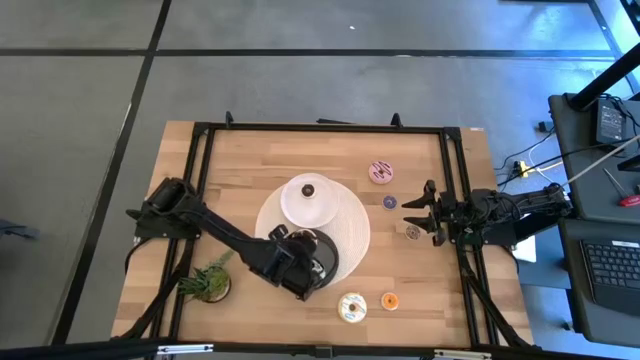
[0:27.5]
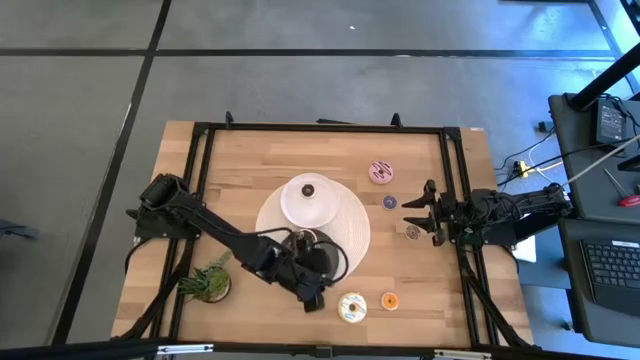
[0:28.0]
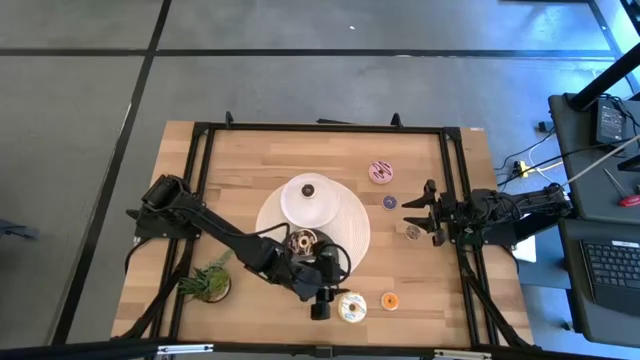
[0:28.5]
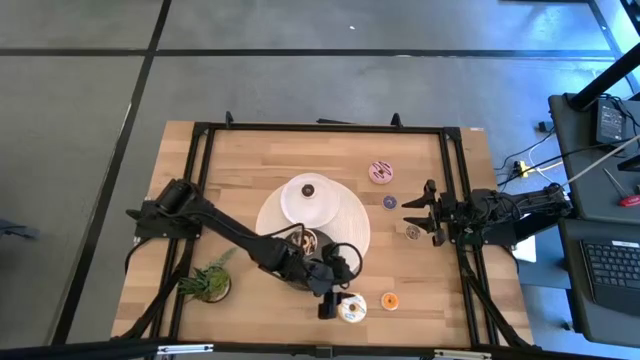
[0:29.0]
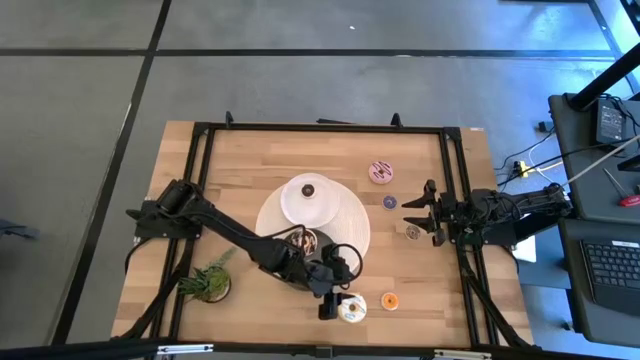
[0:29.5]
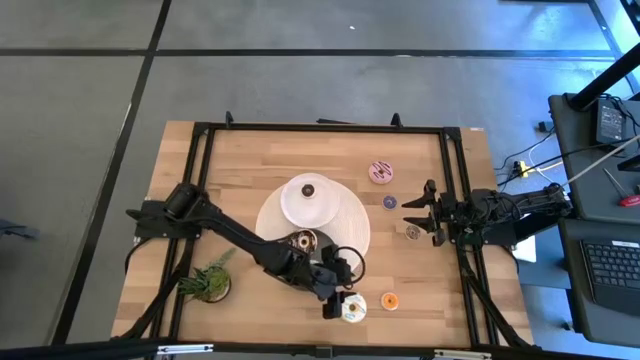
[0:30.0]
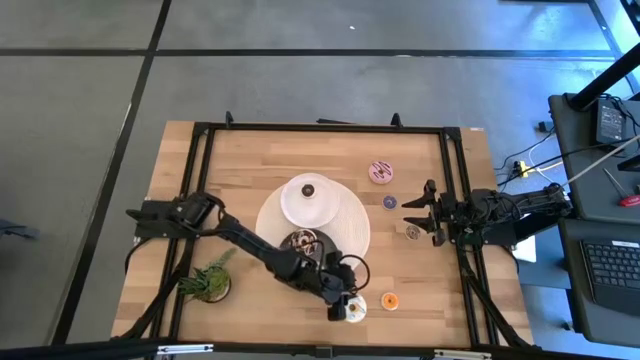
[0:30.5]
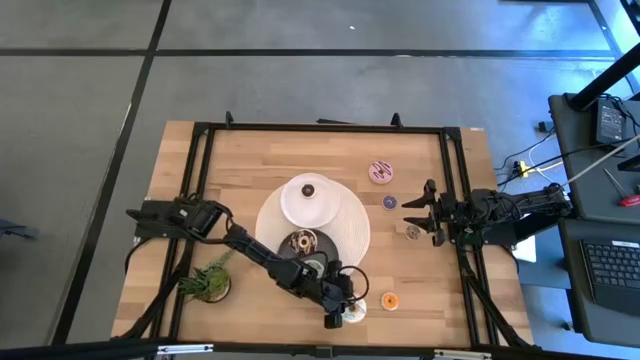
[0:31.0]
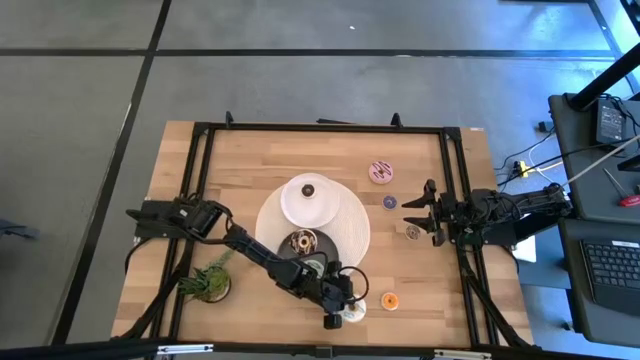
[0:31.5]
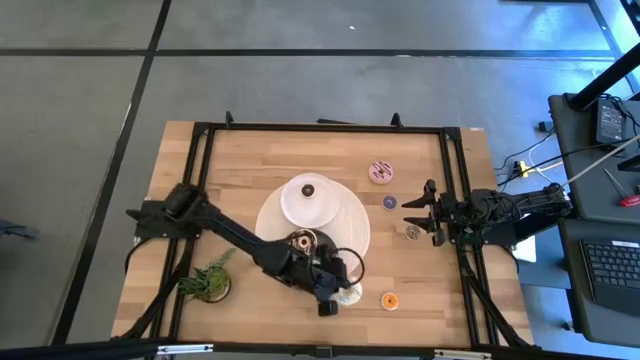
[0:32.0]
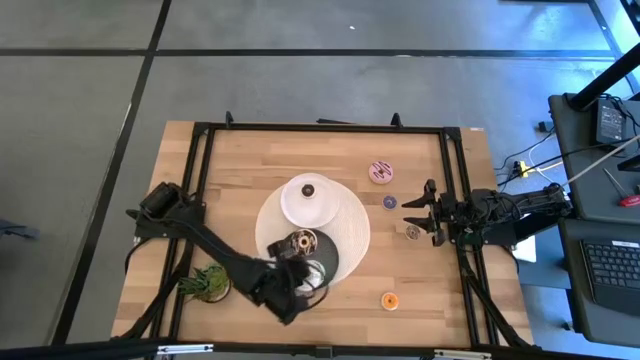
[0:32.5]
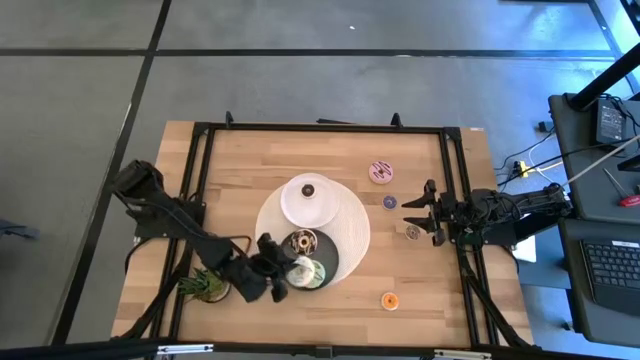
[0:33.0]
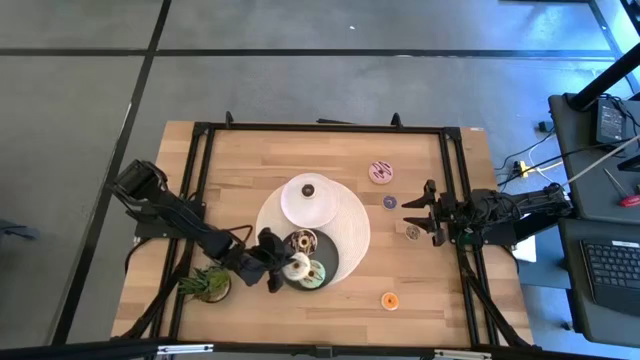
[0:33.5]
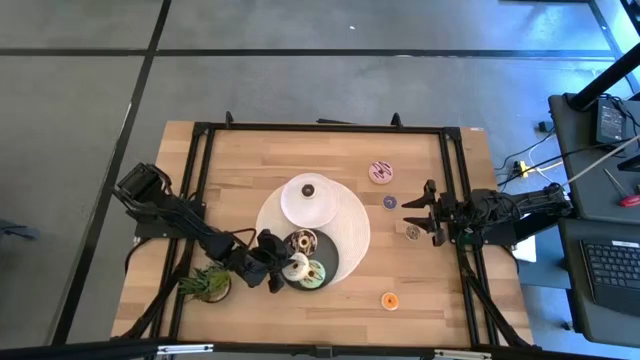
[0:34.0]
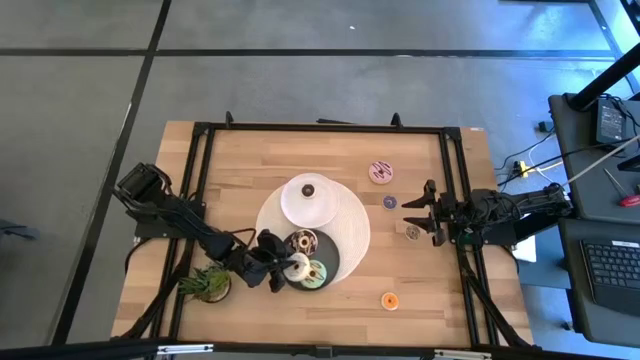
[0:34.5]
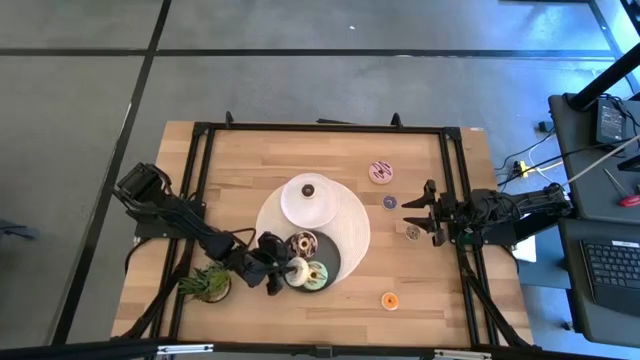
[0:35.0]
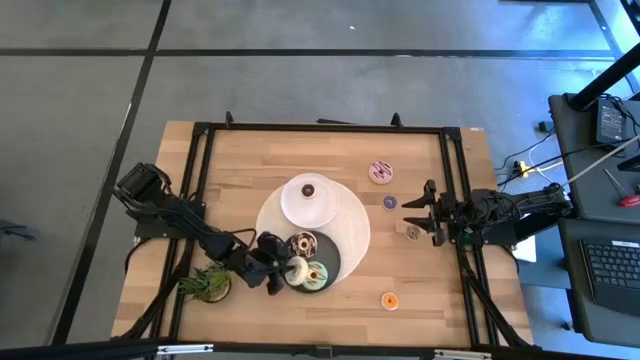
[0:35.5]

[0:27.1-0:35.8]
Task: Pick & Place donuts
Put the large white donut on the black plate

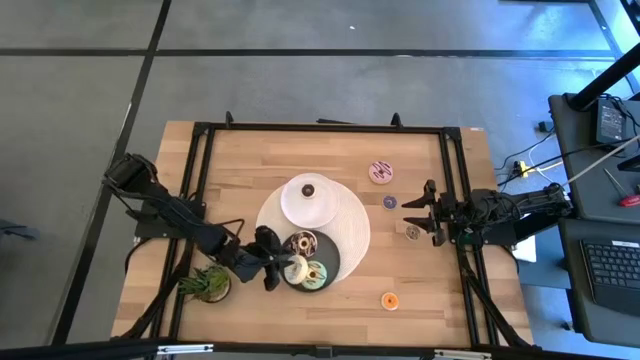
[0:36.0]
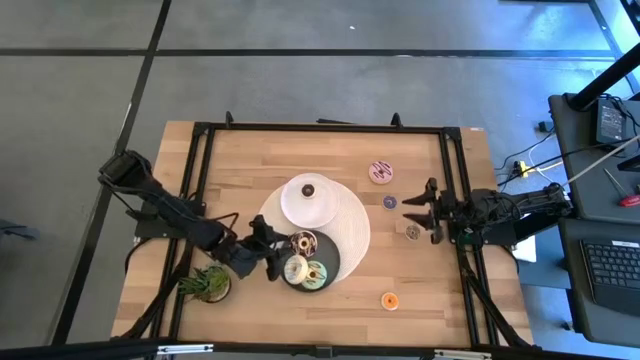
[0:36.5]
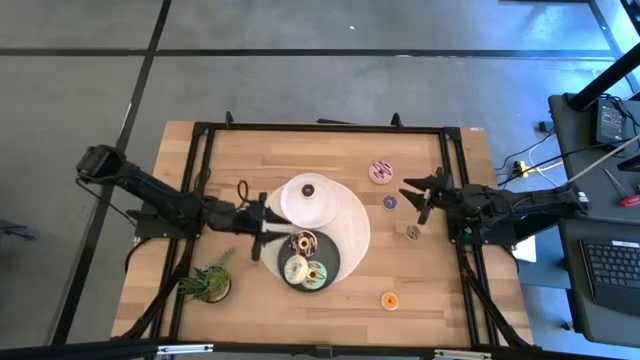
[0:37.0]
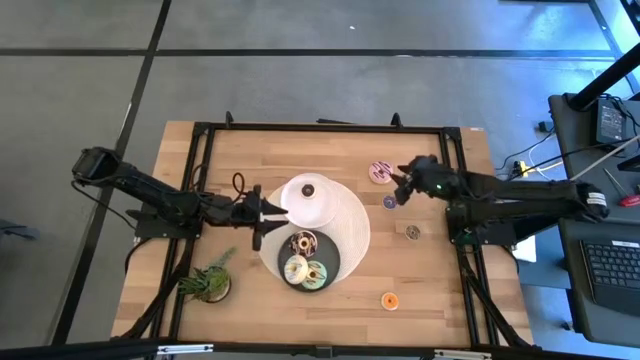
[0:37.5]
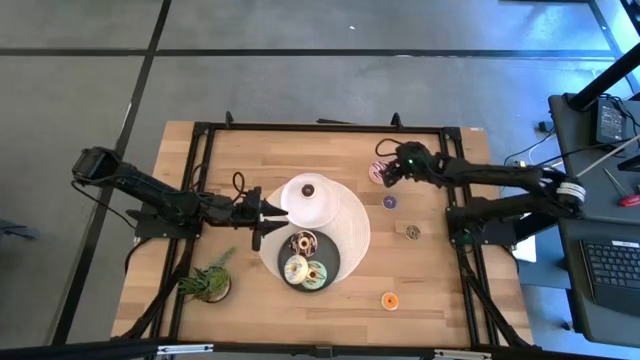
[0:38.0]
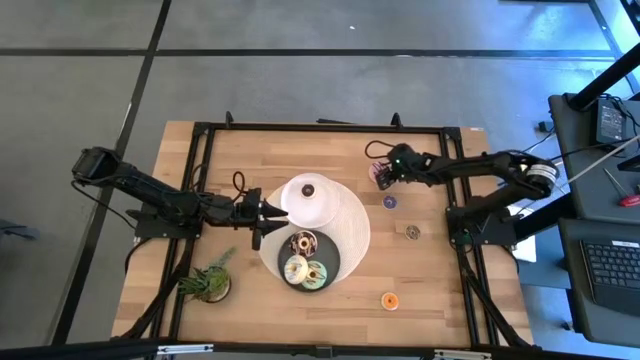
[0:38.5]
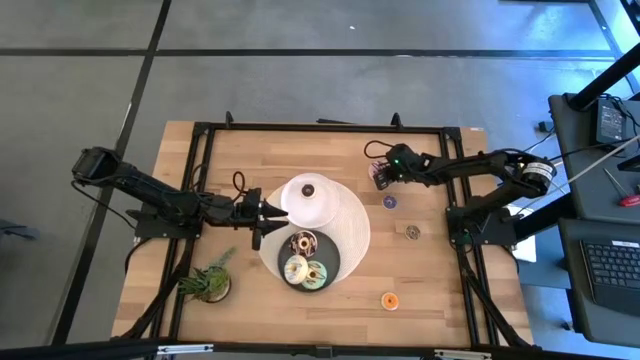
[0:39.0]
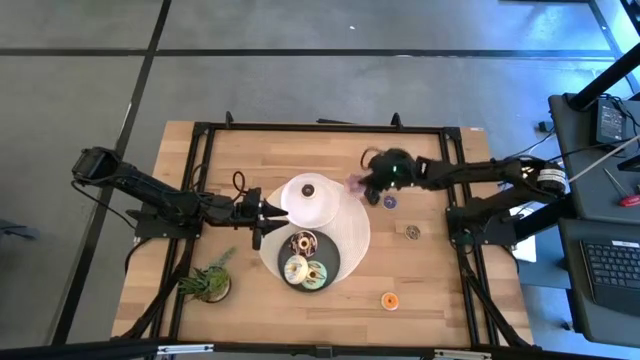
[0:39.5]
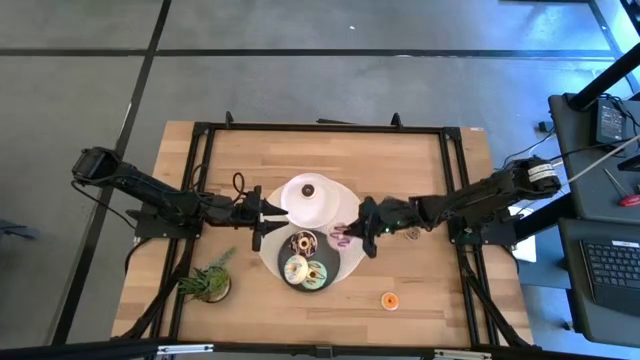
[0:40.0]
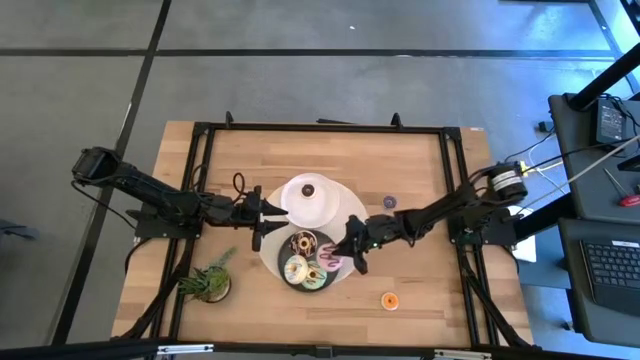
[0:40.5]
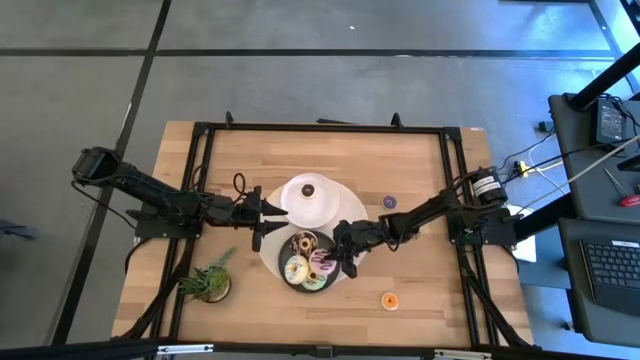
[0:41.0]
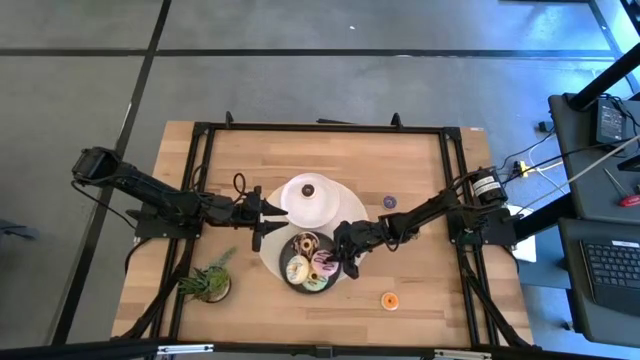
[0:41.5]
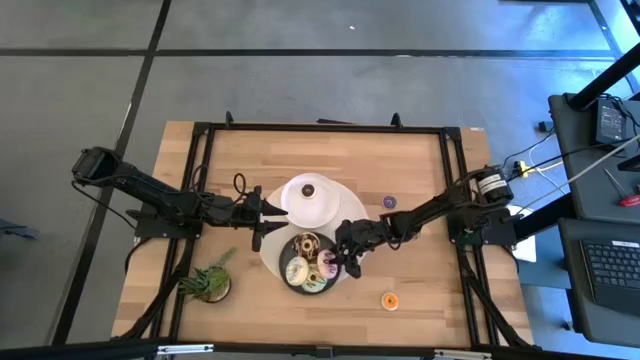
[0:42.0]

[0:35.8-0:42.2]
Put the large pink donut on the black plate

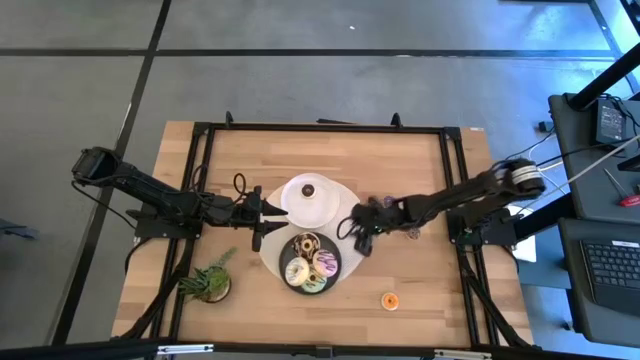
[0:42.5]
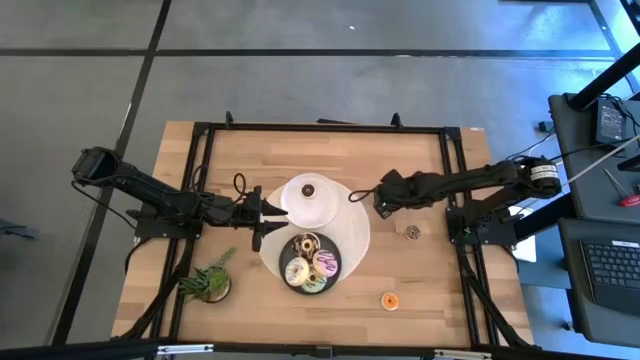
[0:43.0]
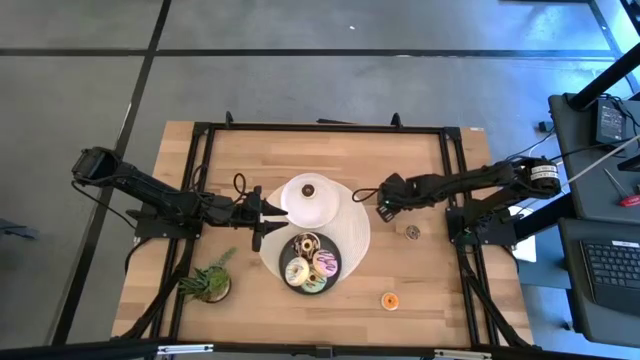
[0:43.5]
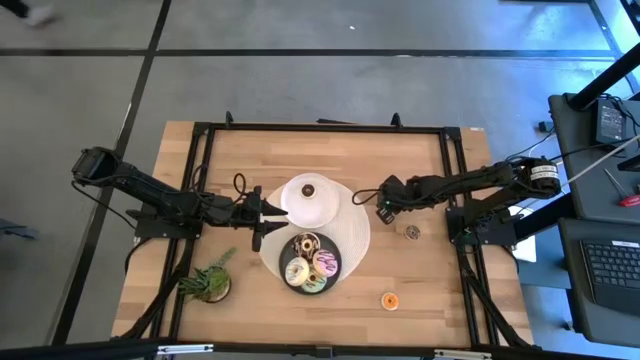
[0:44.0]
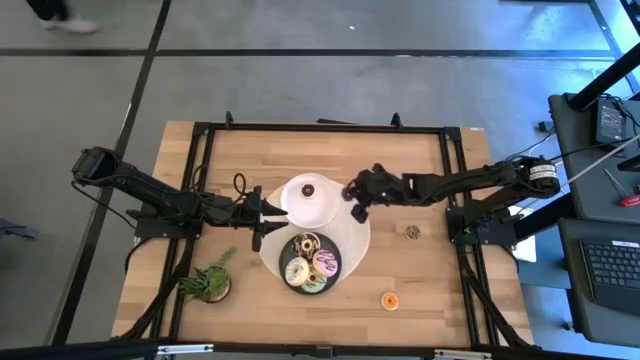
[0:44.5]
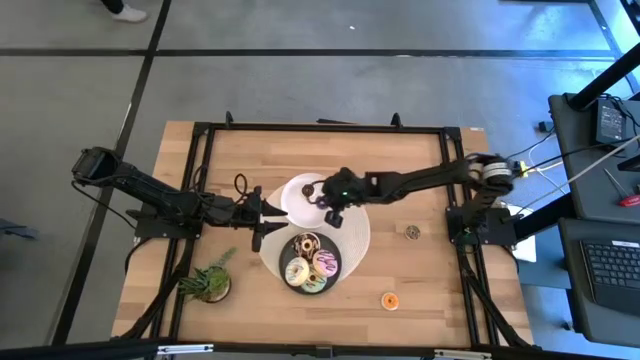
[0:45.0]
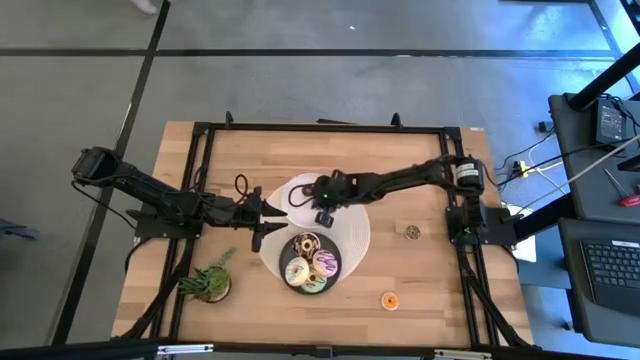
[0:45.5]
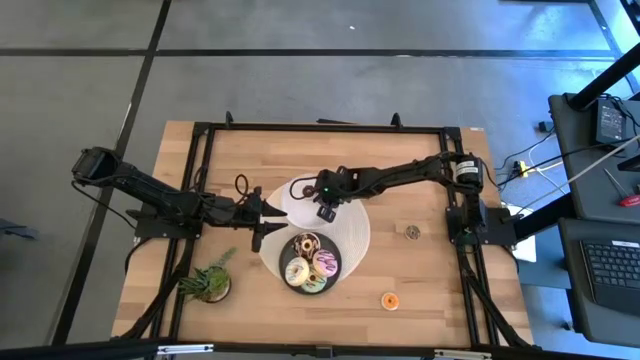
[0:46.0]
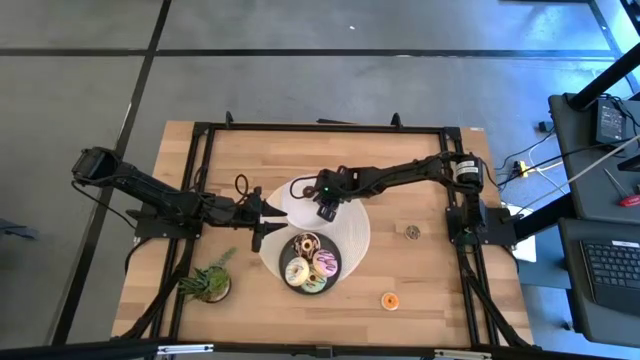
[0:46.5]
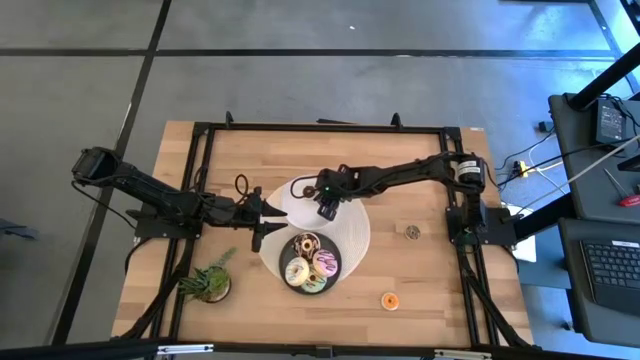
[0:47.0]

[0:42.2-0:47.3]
Put the small blue donut on the white plate

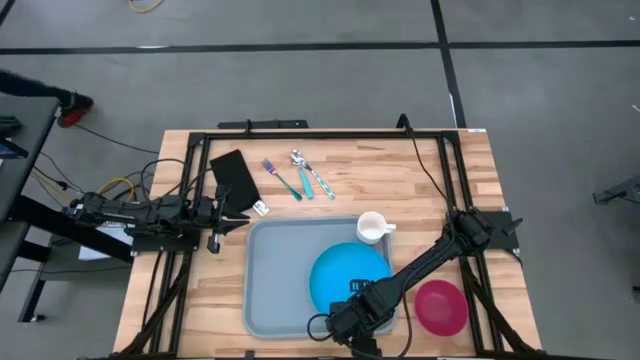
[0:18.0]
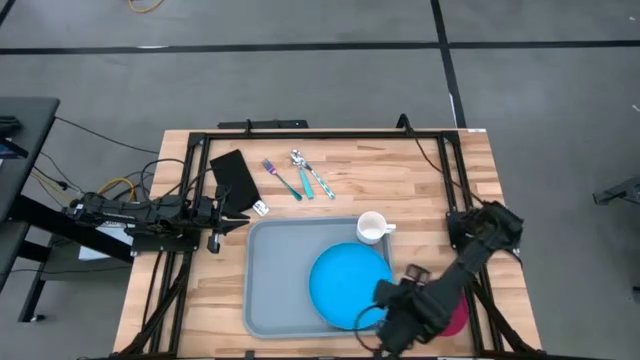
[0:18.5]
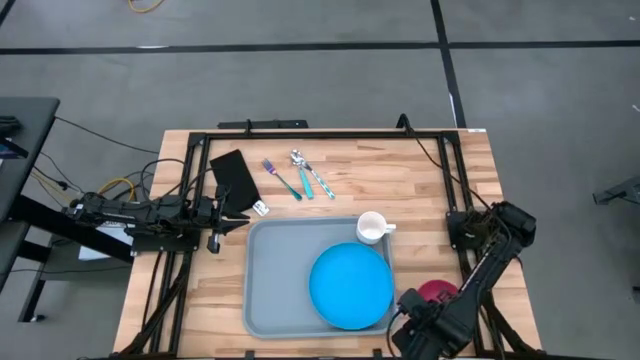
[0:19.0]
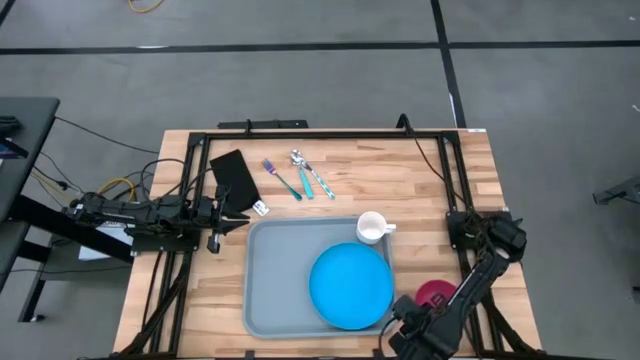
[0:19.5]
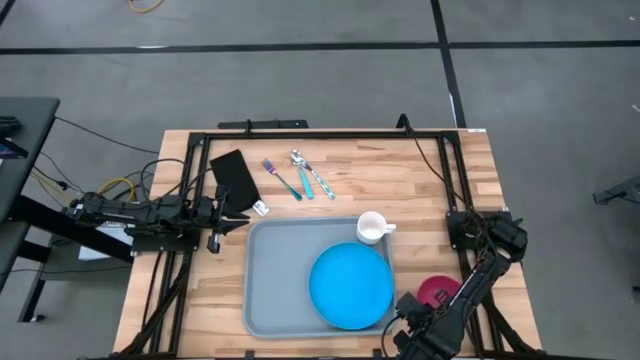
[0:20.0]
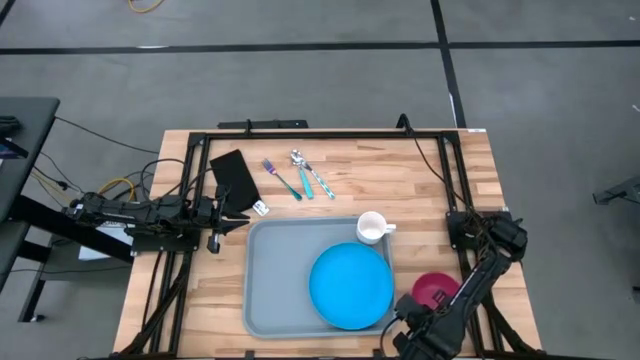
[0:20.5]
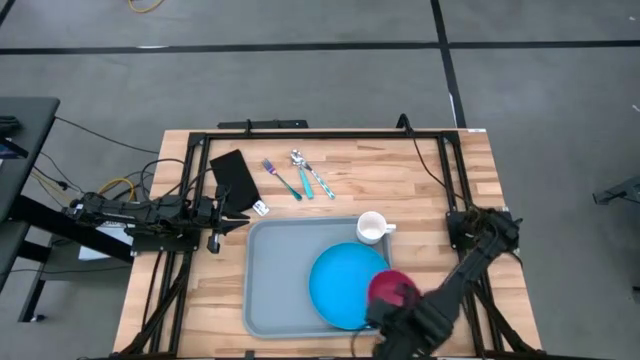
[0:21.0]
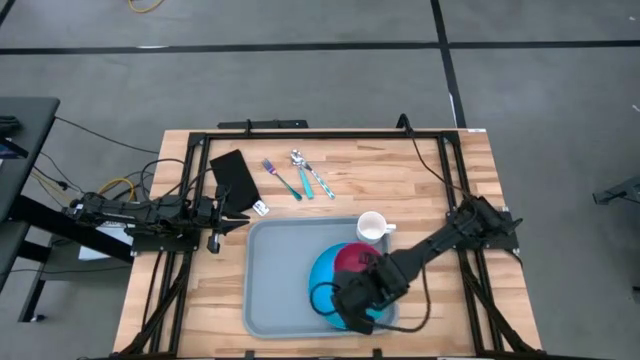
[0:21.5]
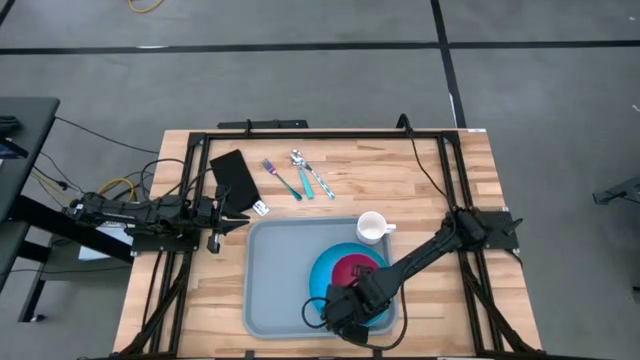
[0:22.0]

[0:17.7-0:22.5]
Task: Set up tray
Put the red bowl on the blue plate
